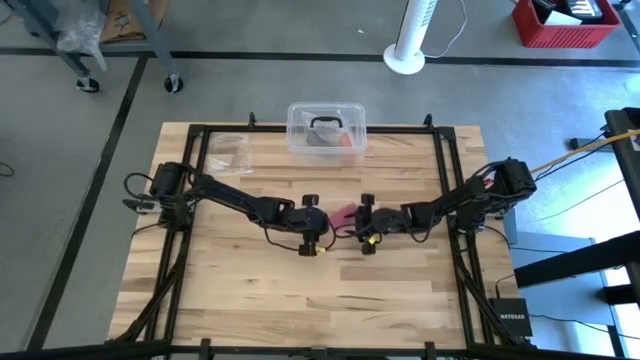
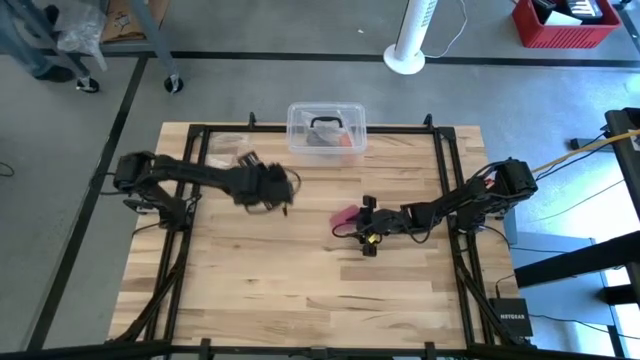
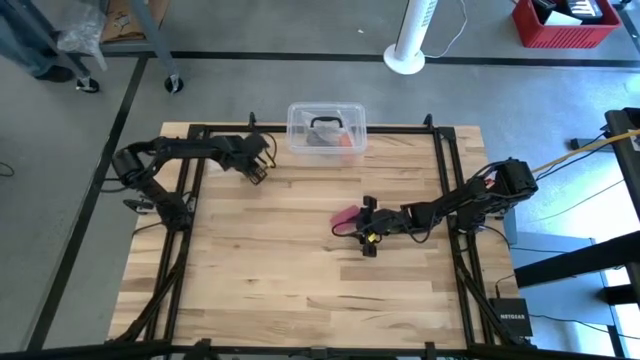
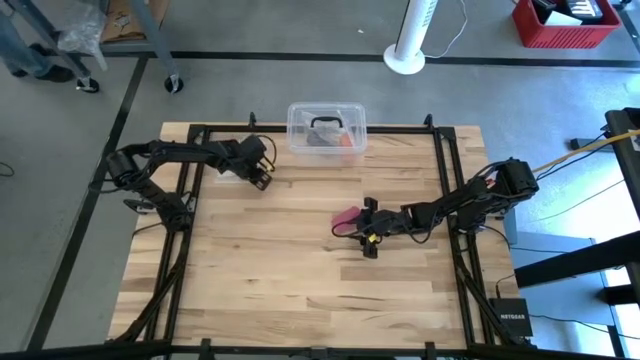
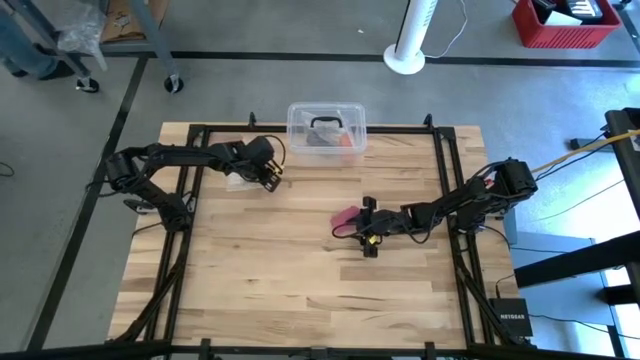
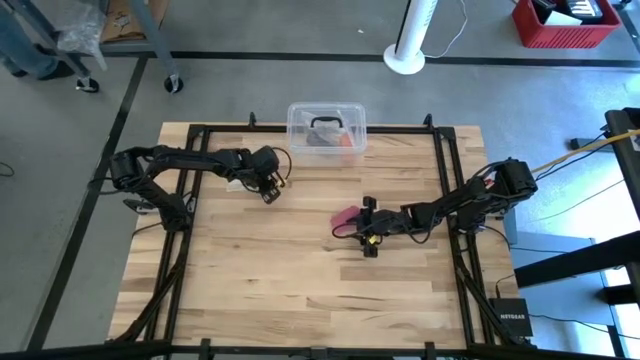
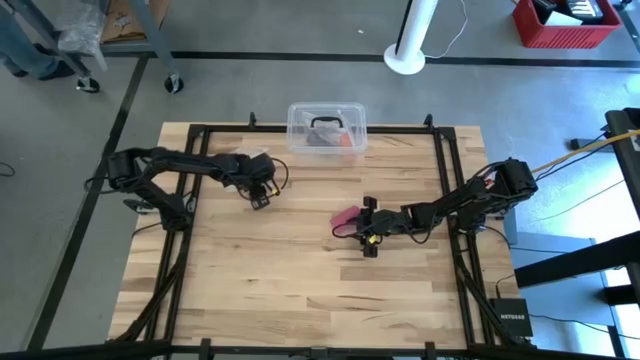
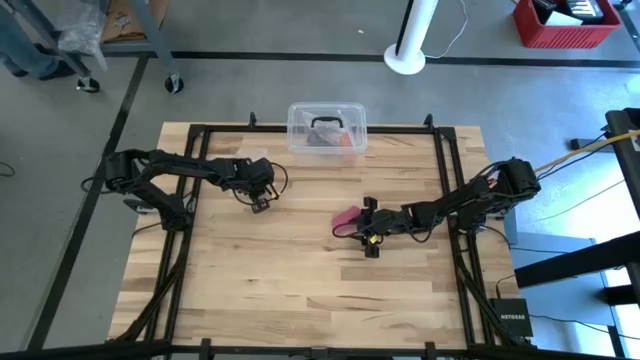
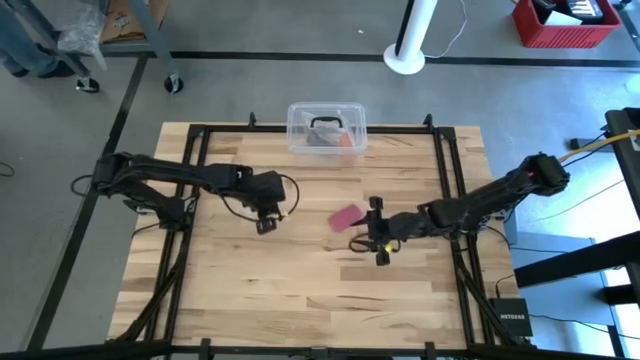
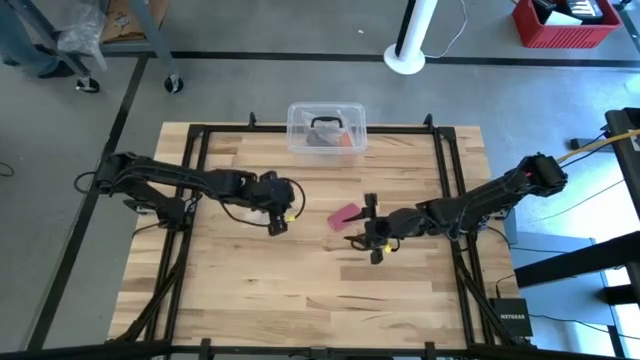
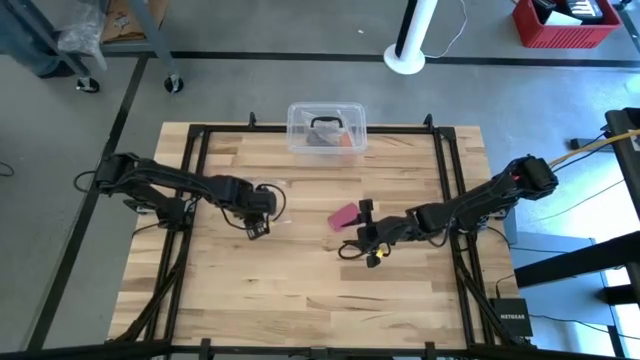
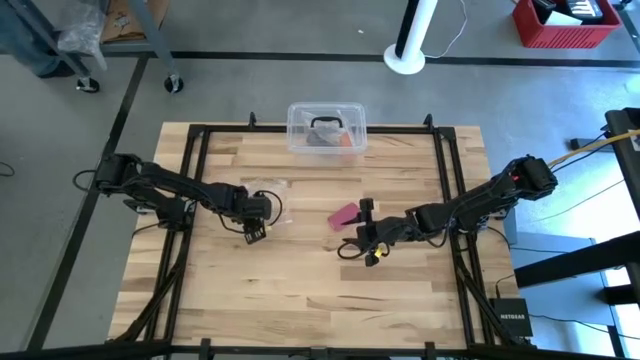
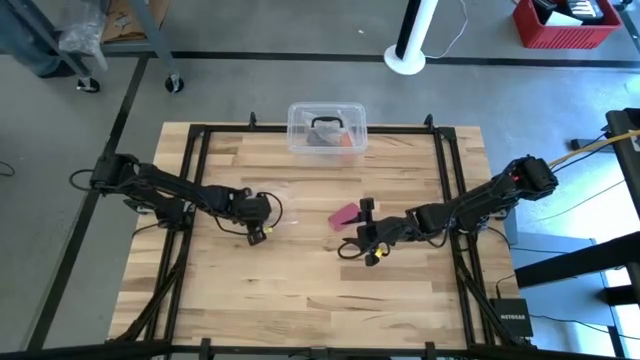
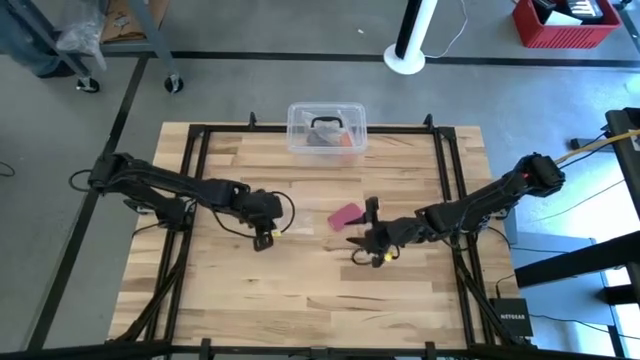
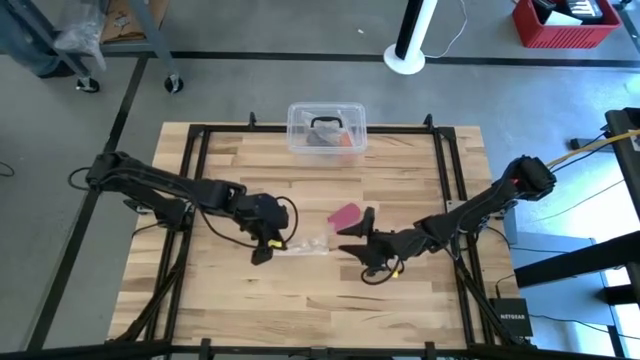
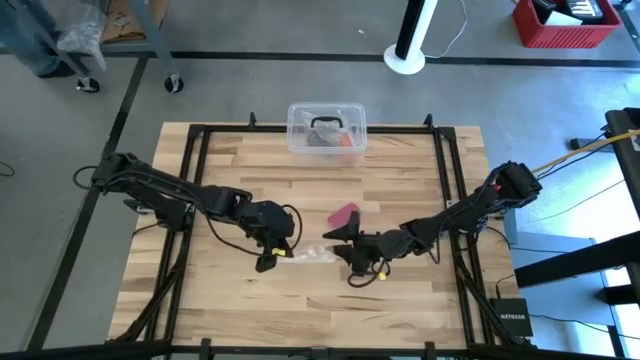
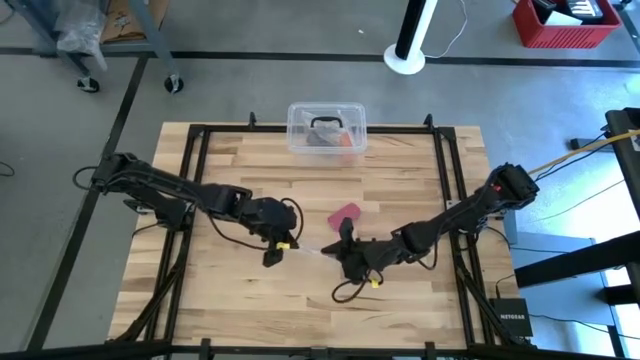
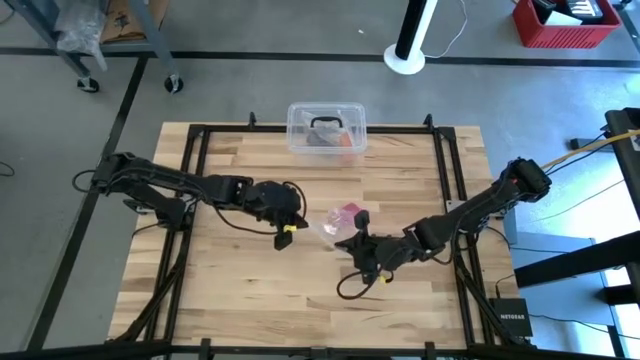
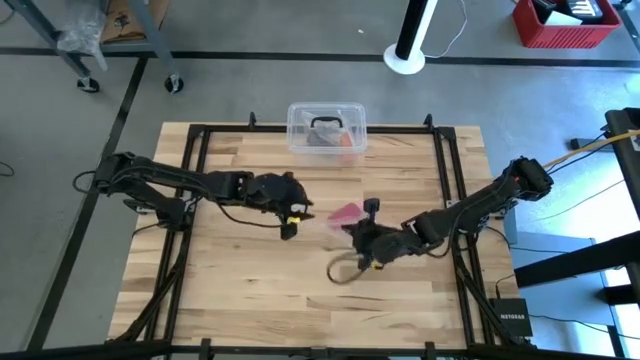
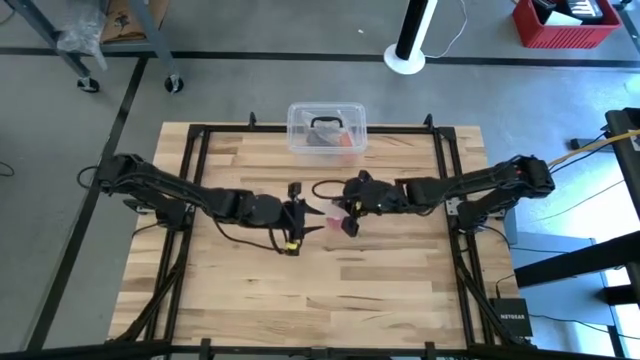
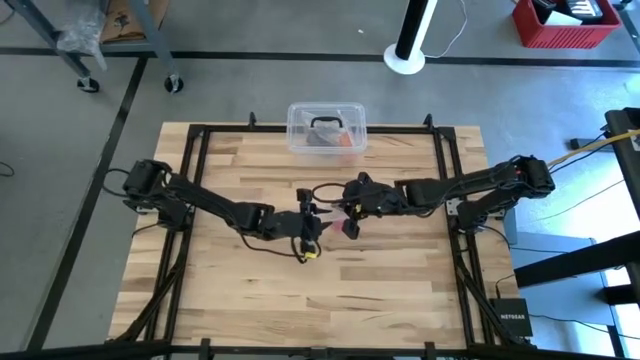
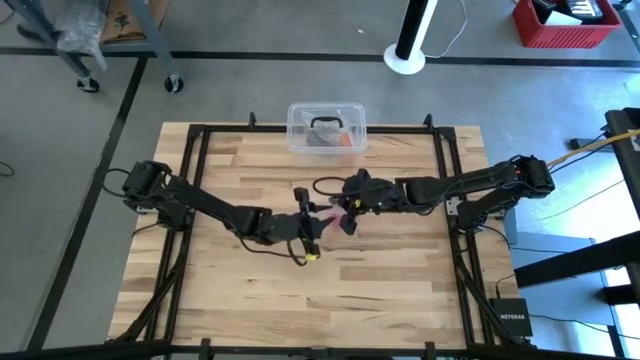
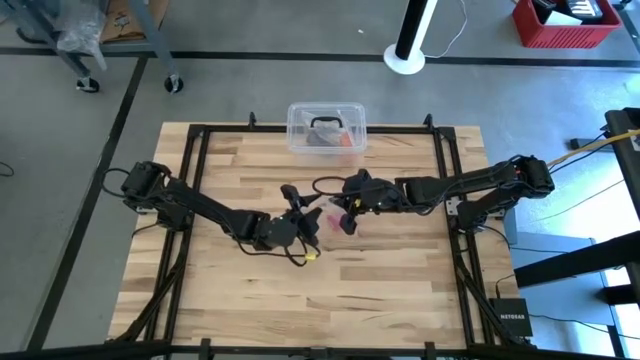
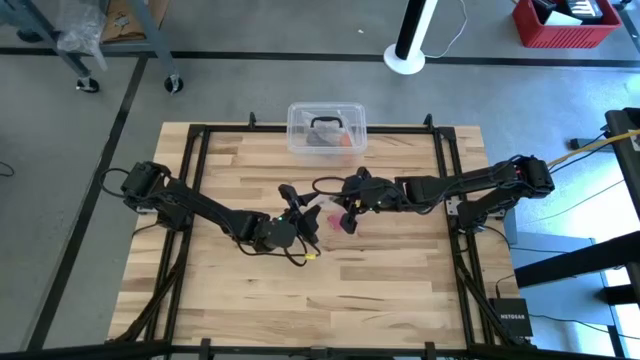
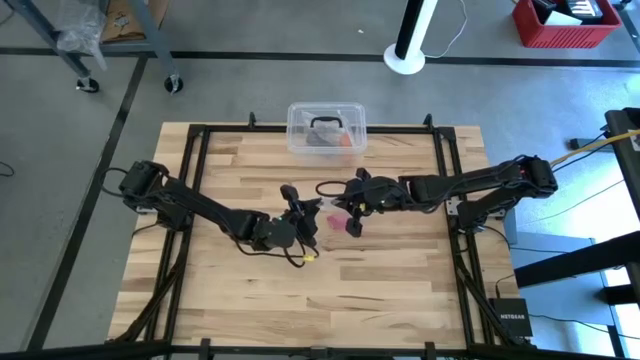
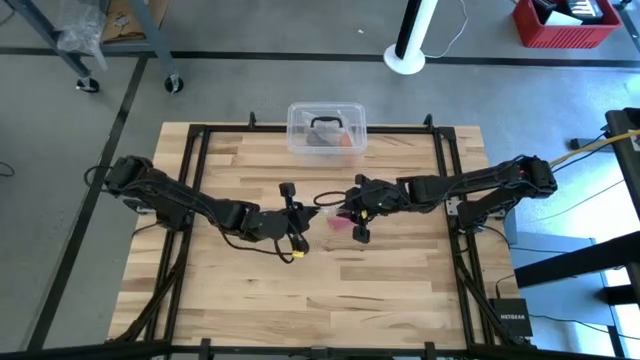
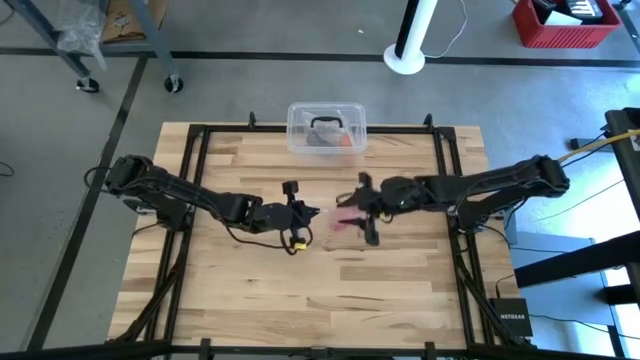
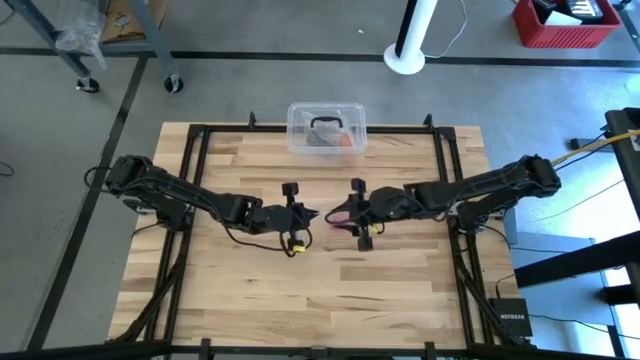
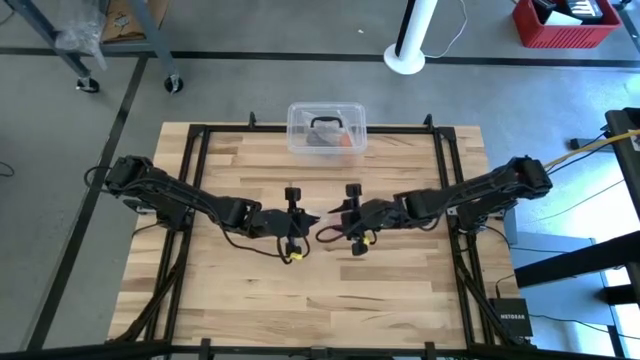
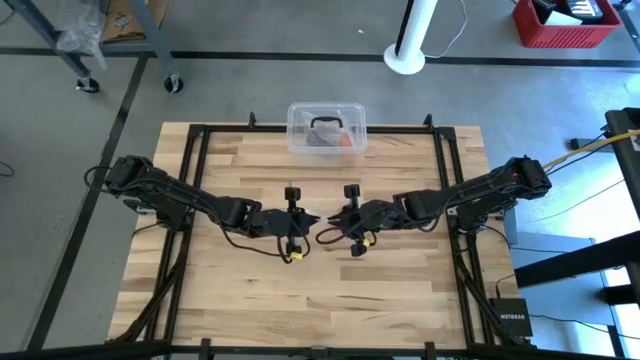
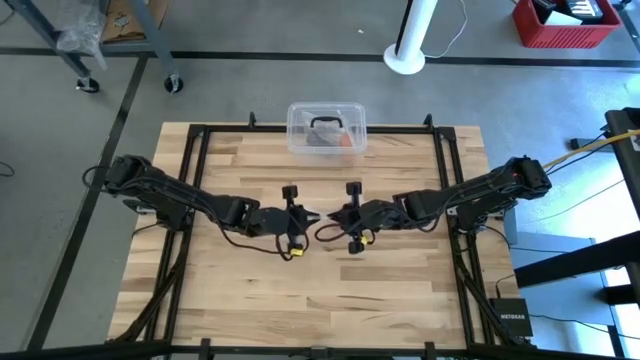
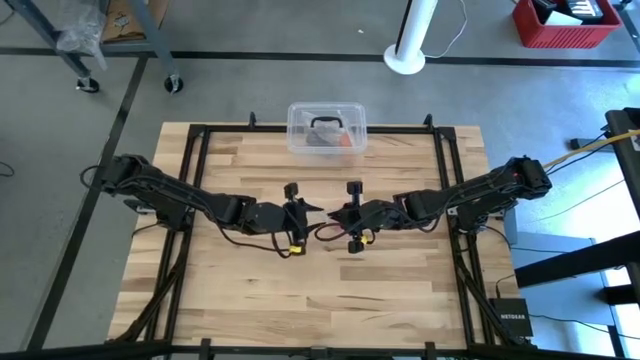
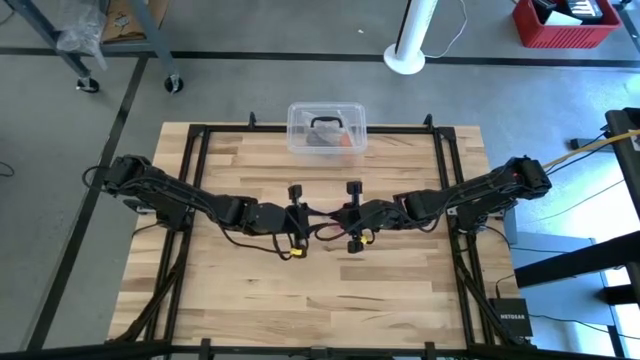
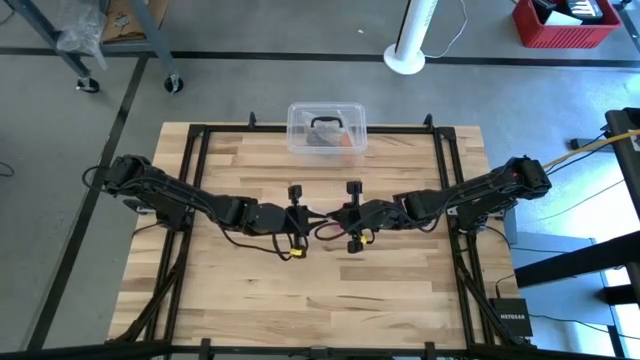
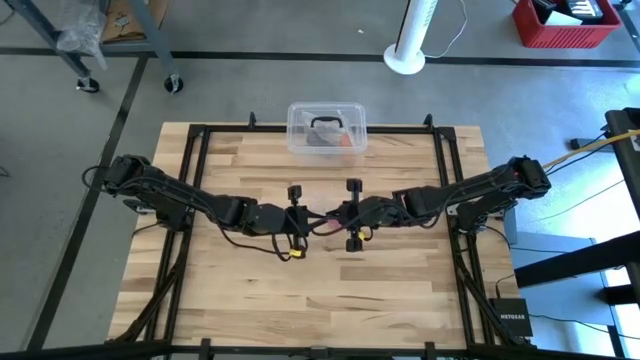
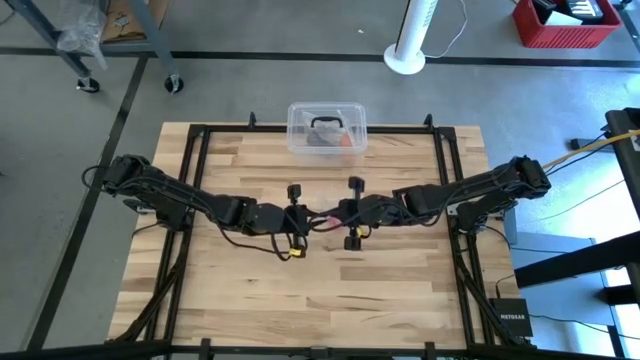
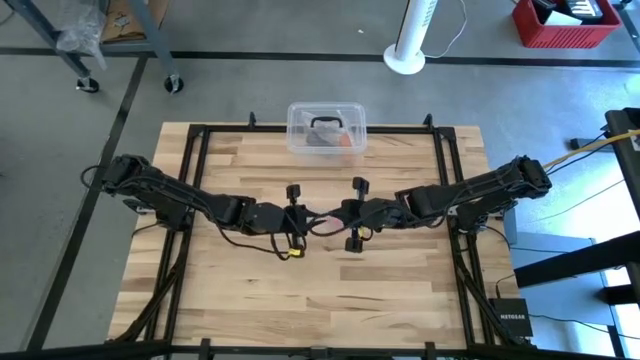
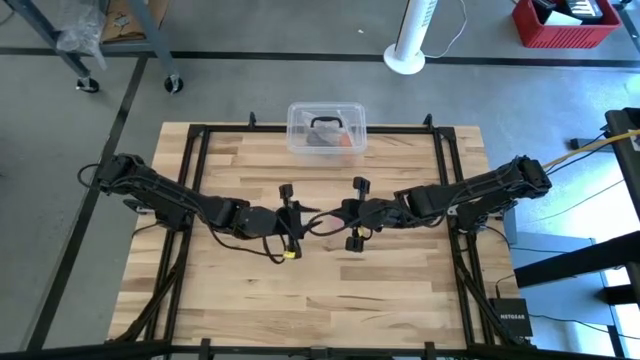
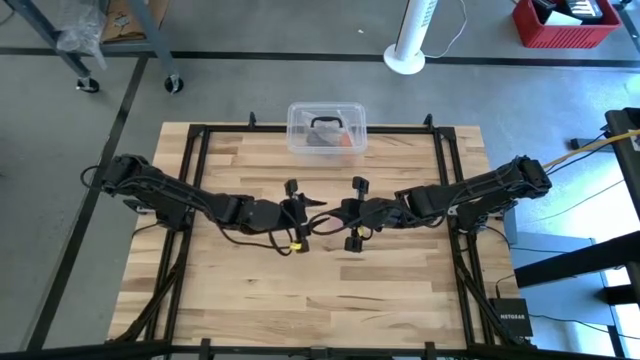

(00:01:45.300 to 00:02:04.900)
Task: Roll bandage
Open the transparent zip lock bag

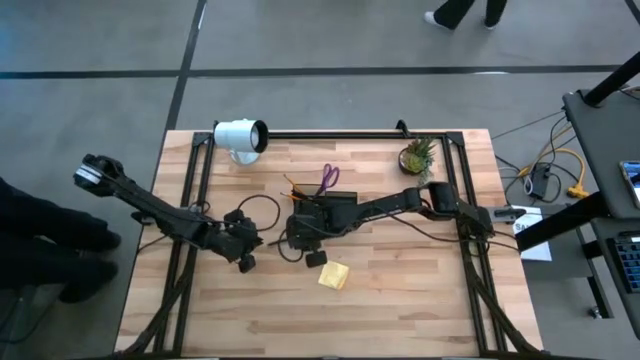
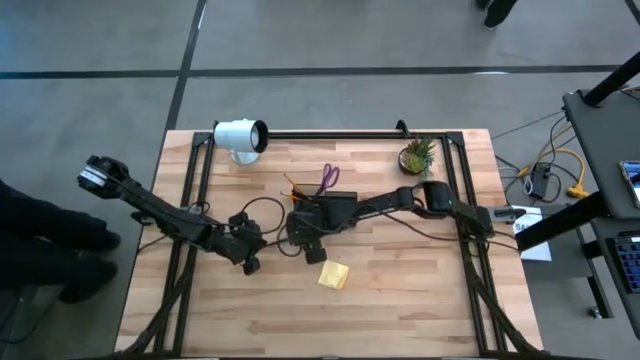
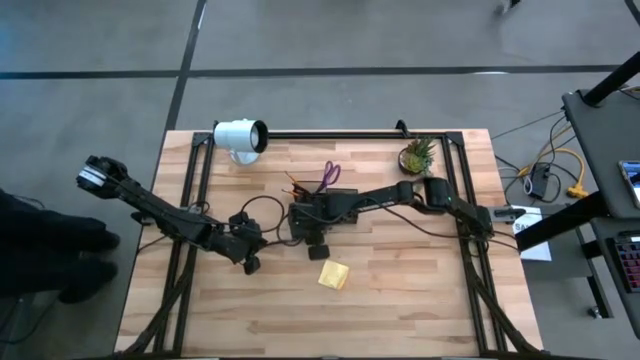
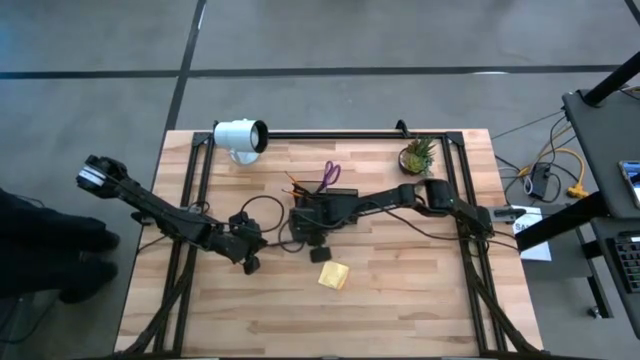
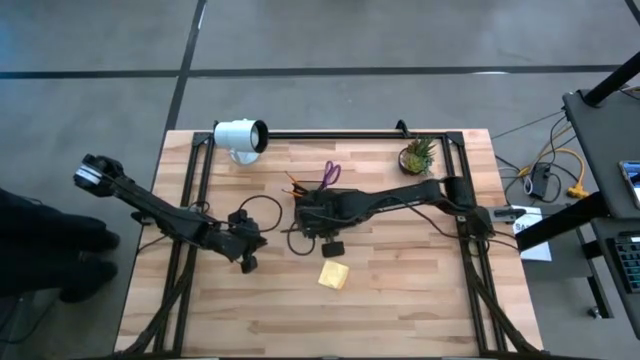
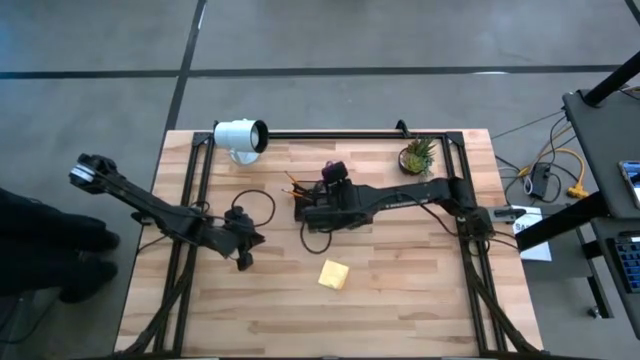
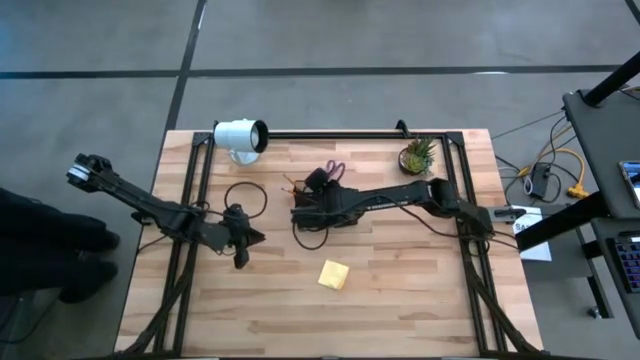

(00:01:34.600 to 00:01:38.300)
Task: Pick and place office supplies into organizer
Put the black pen into the black desk organizer
